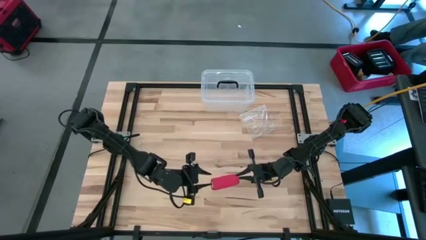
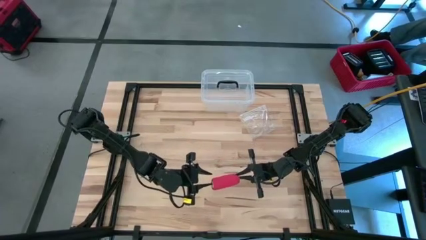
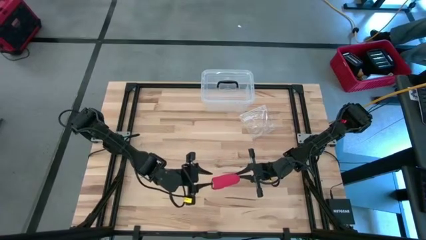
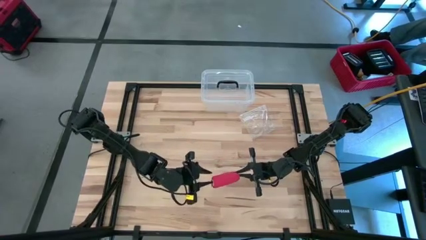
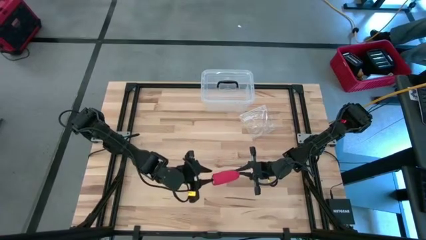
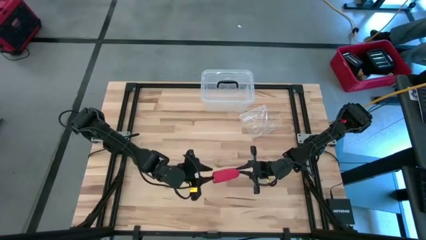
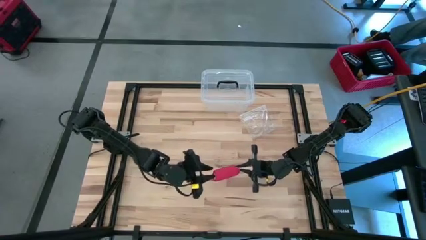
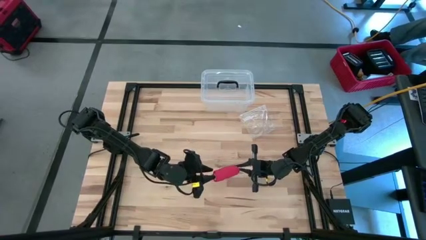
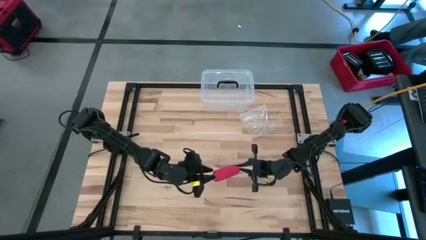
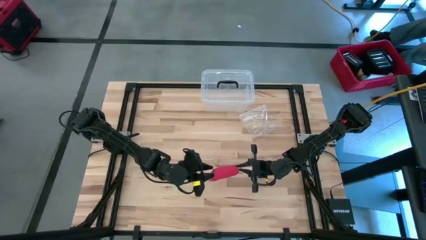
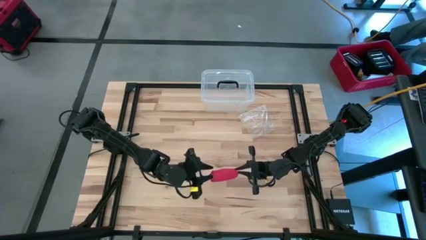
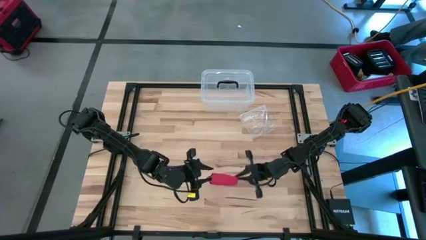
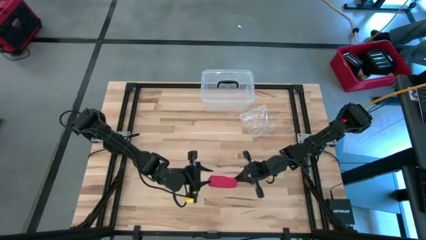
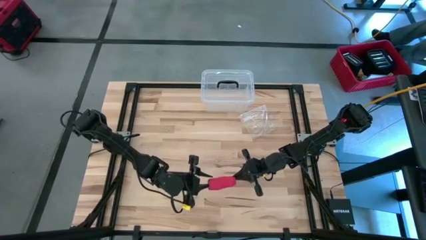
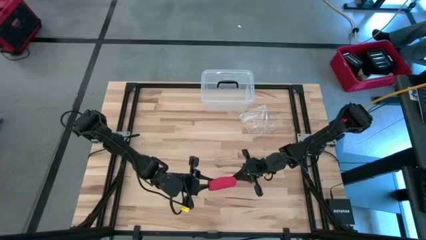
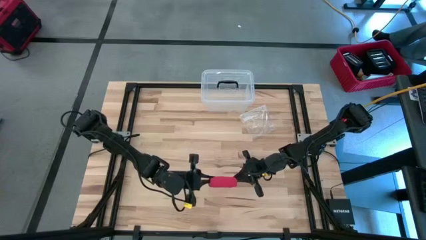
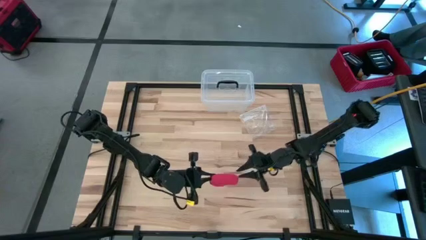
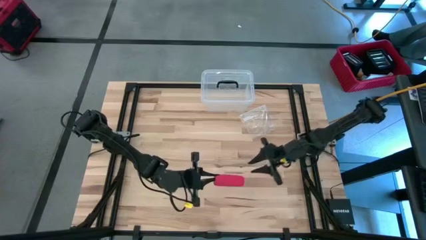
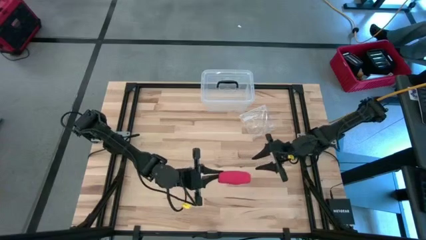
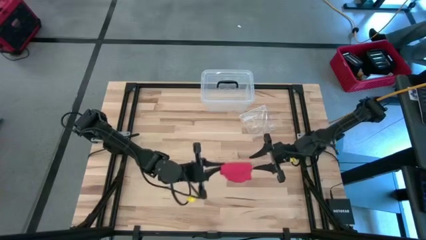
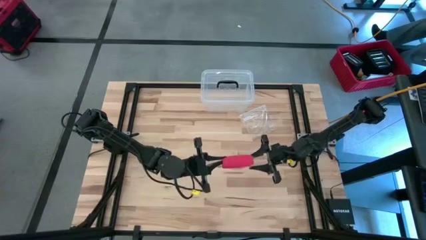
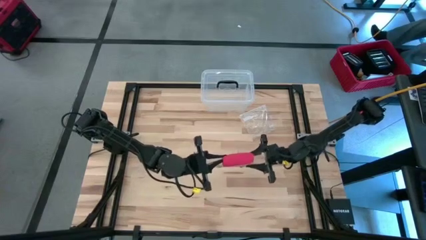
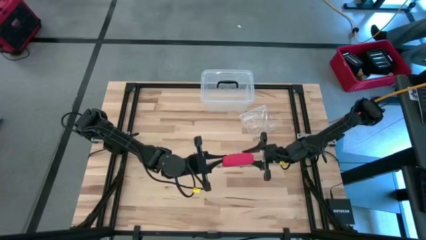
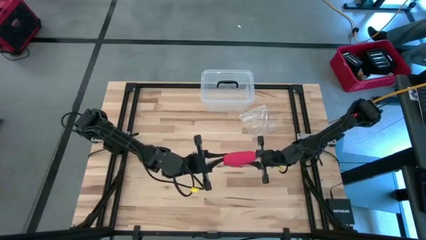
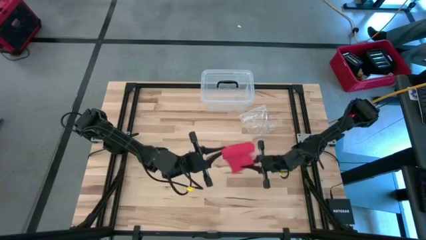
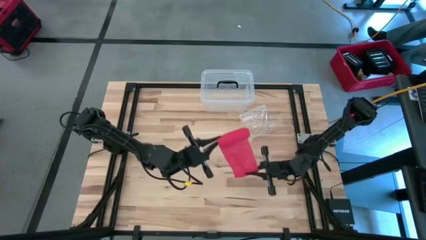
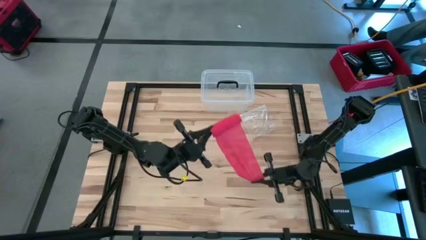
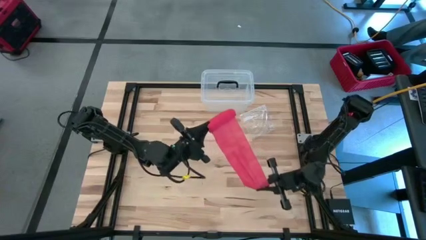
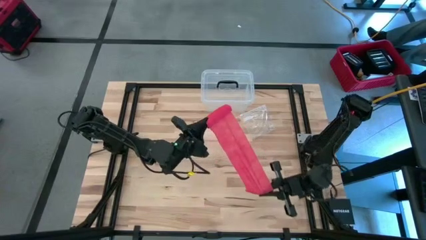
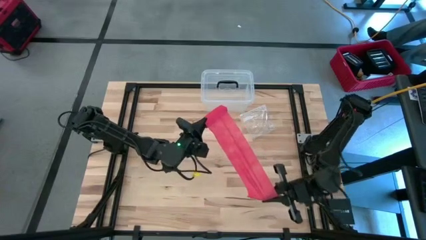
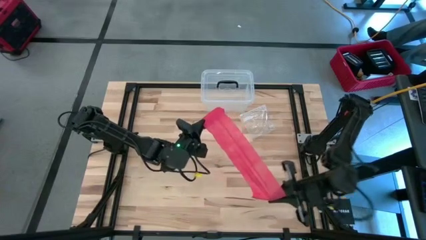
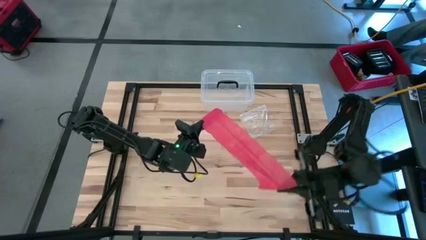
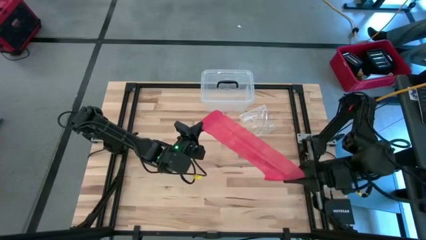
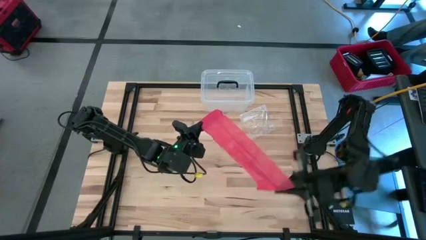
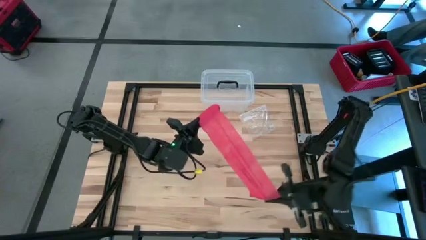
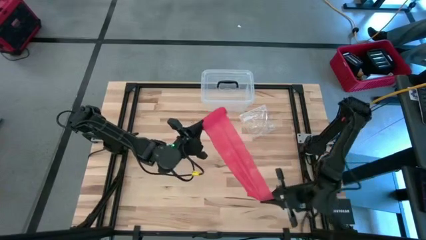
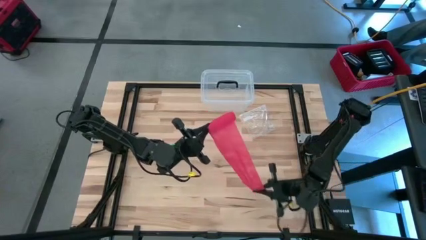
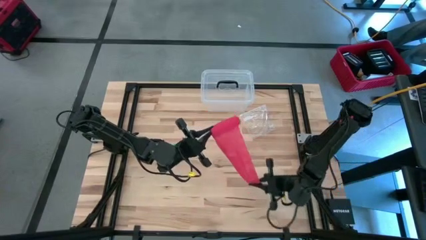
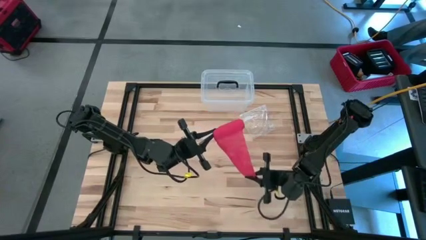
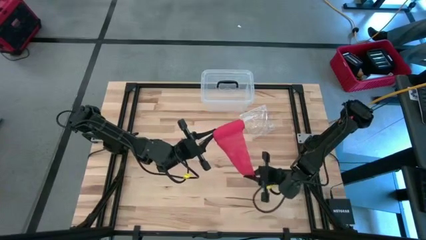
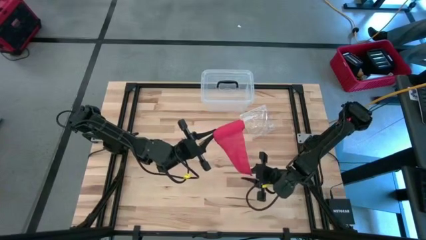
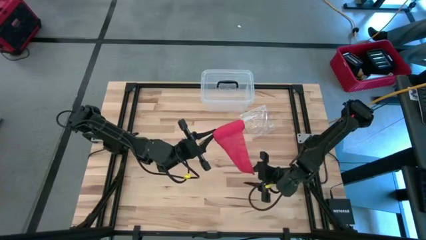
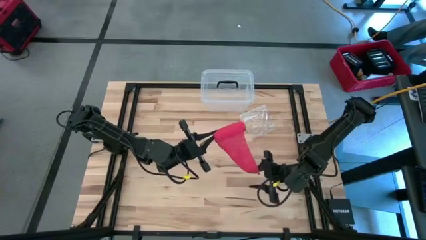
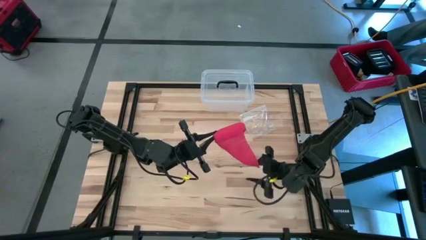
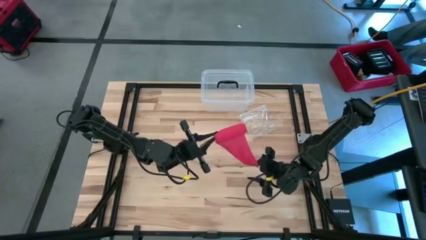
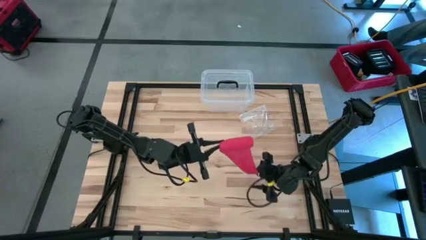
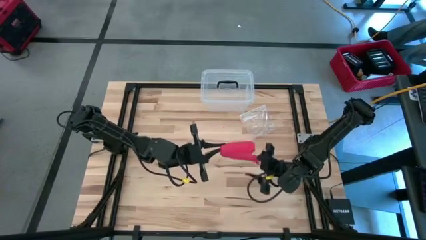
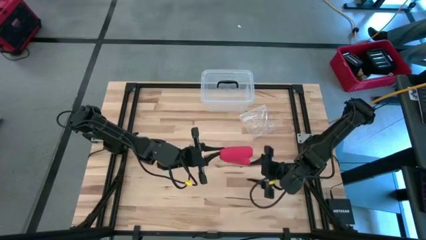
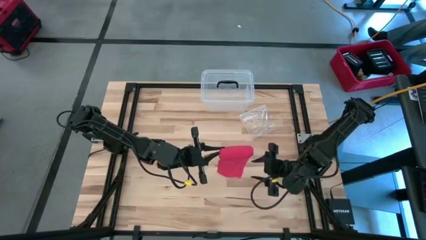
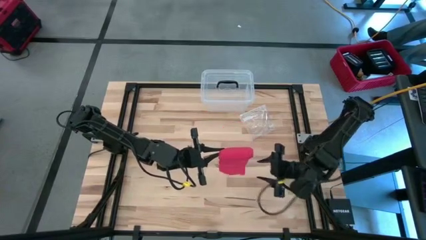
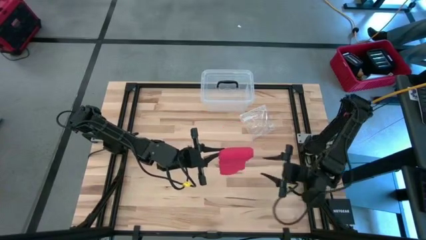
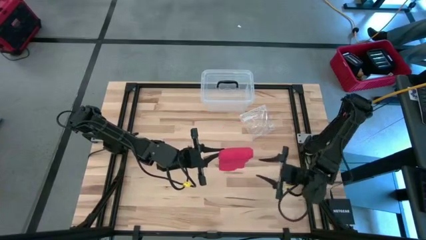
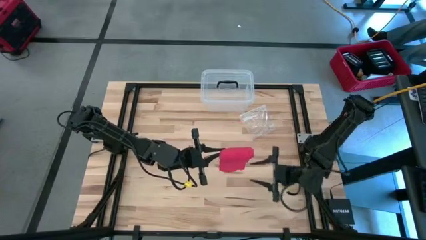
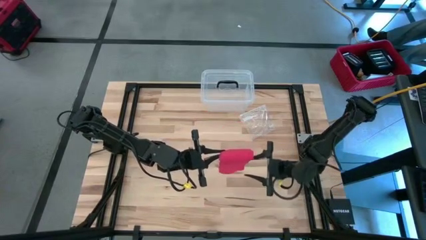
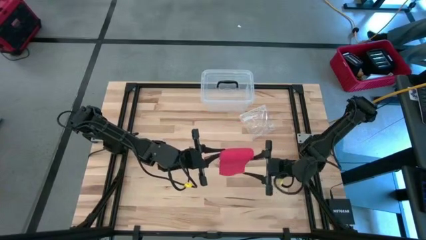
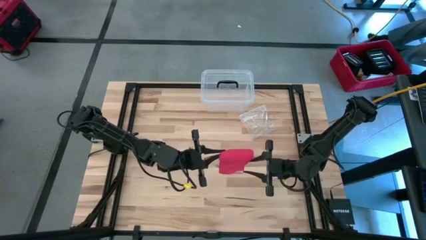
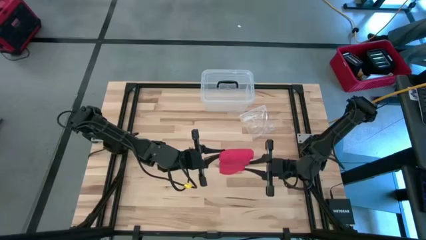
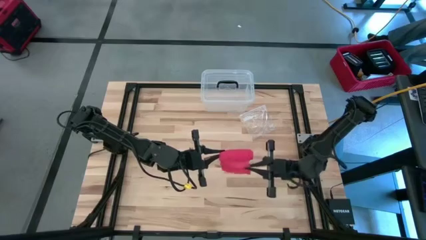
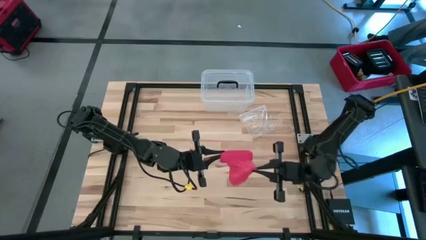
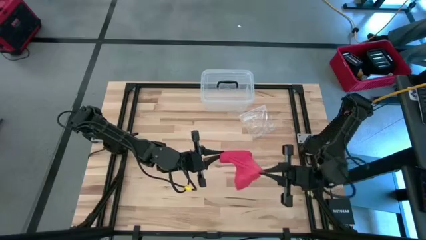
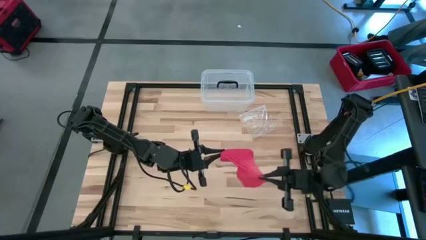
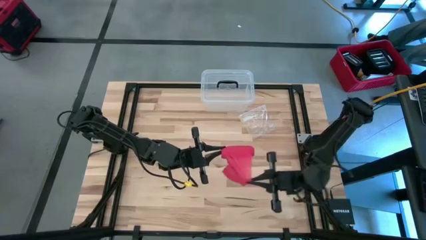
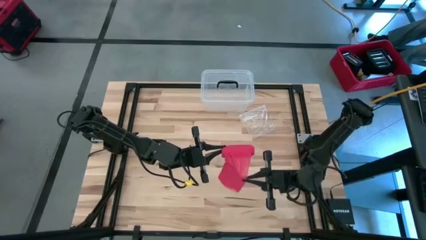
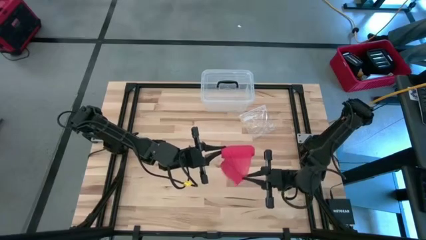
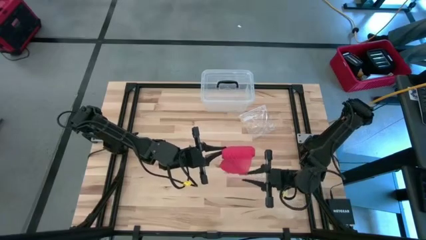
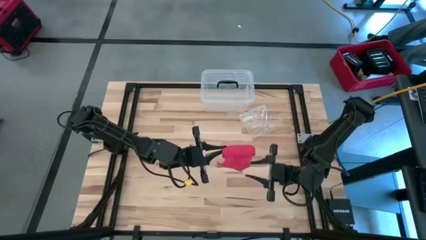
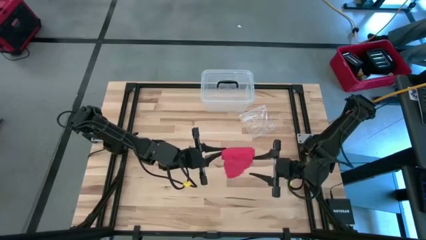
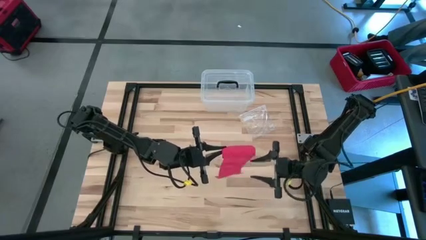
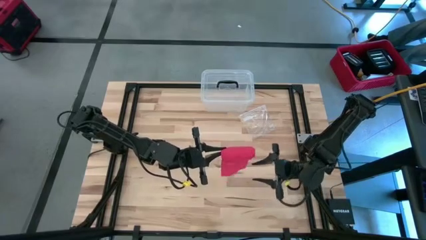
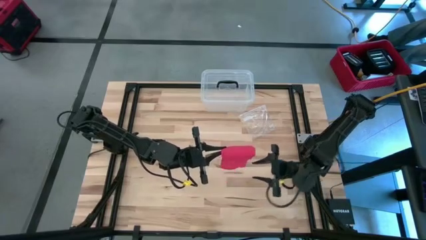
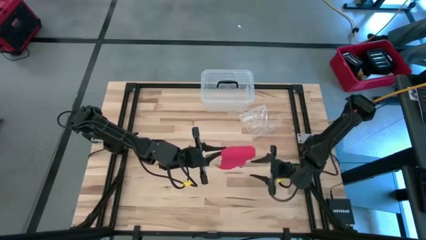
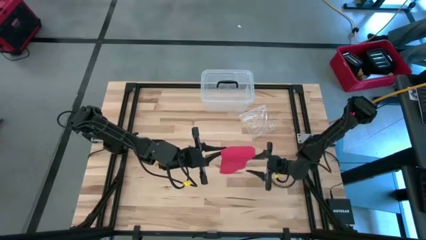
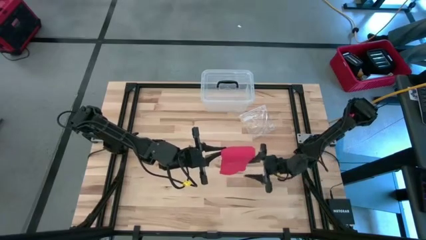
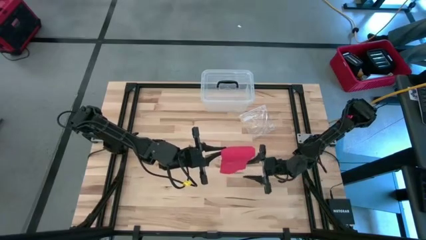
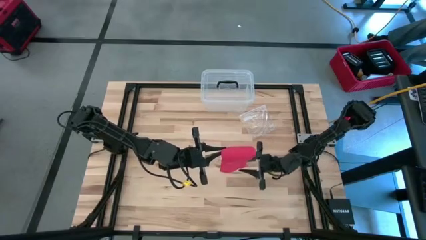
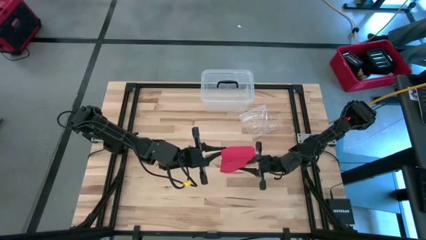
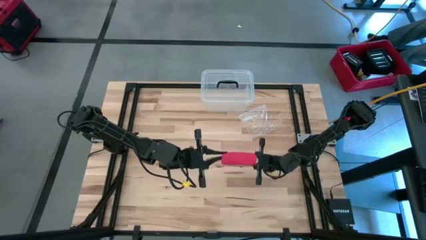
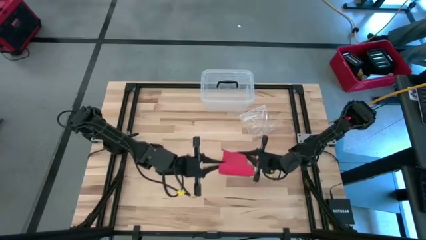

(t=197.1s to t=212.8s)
Task: Roll bandage
Roll the red bandage

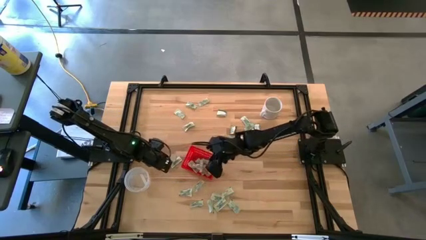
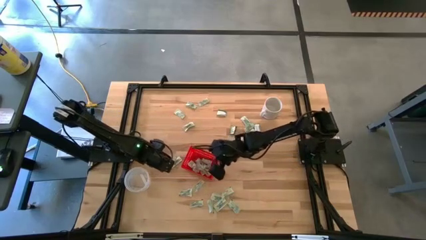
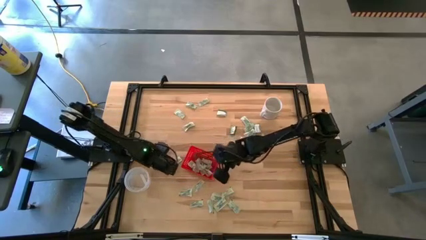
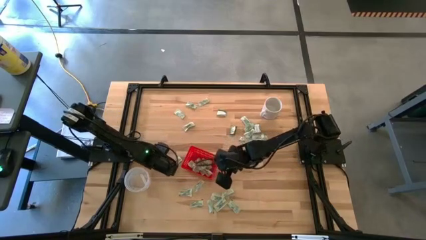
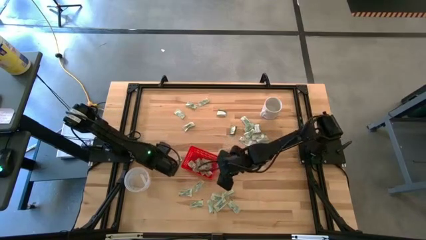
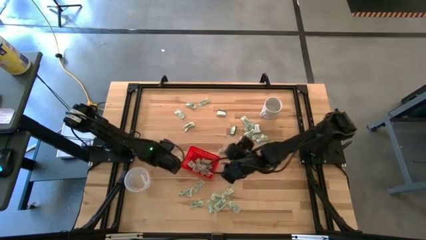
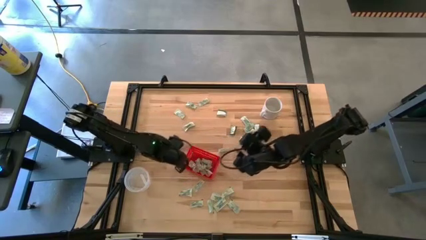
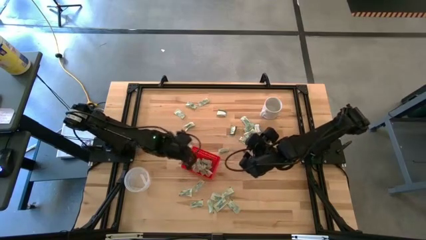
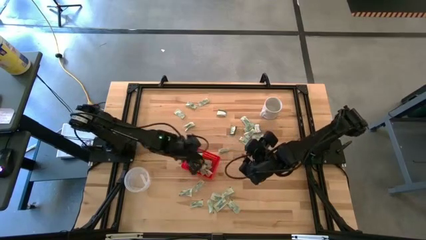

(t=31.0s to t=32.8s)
Task: Pick and place Stevia / Truvia into bins
Put the dark green truvia packet into the red basket
